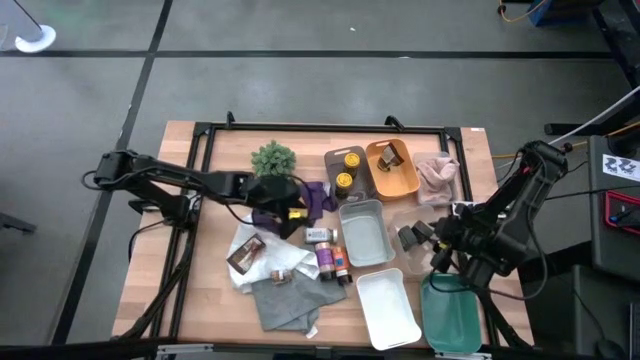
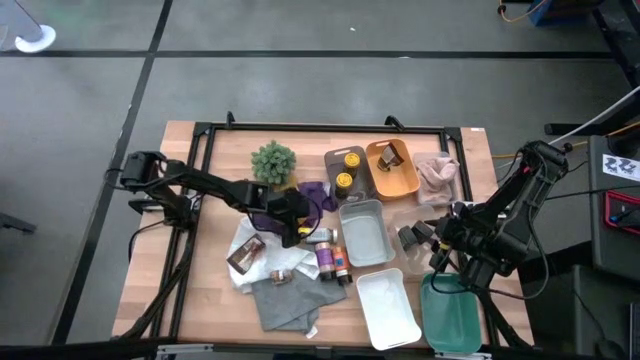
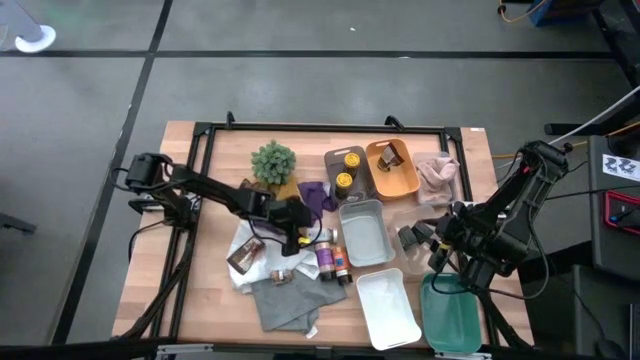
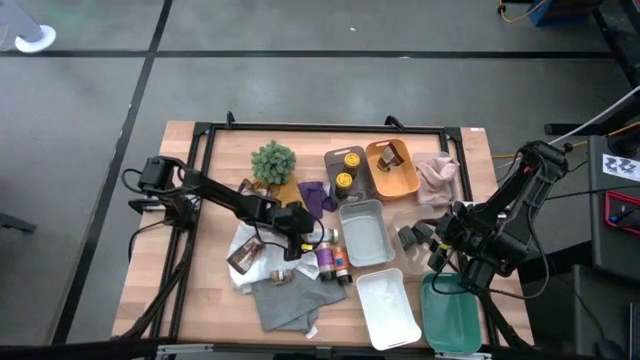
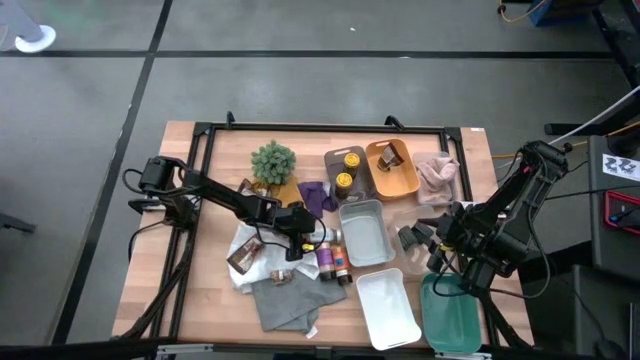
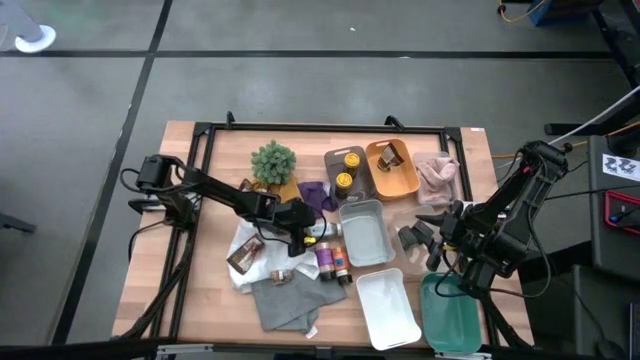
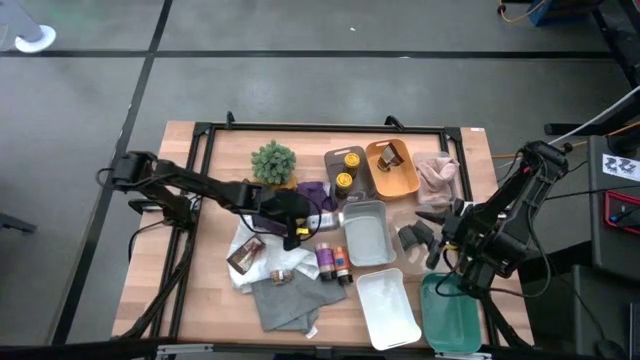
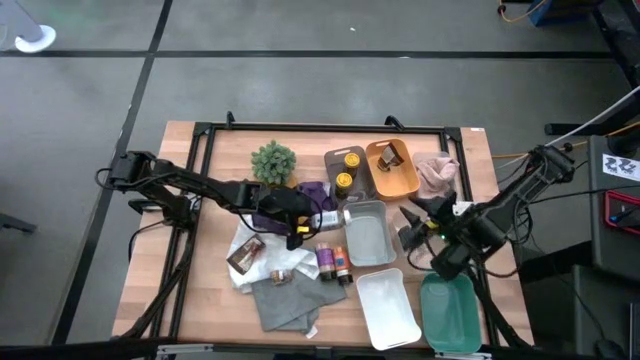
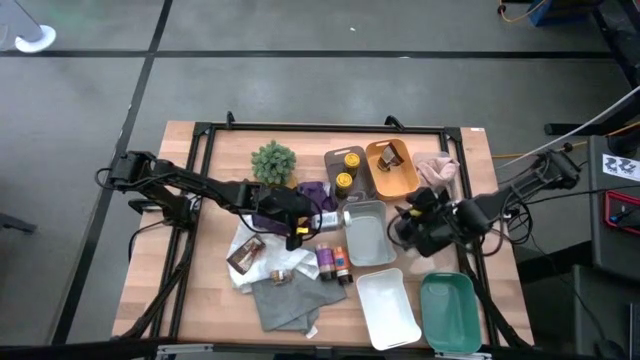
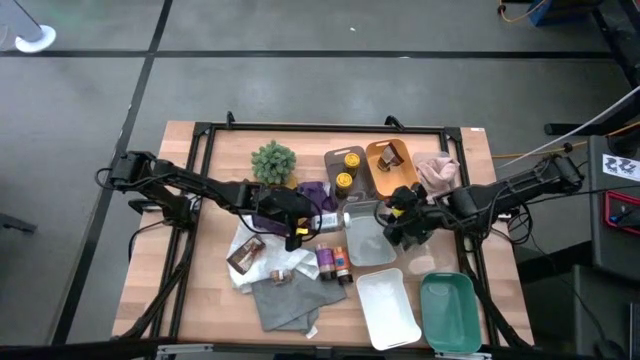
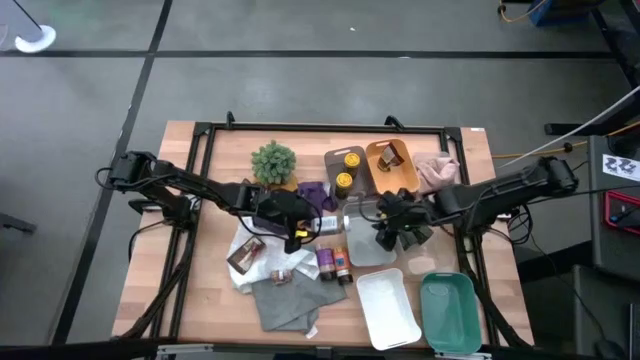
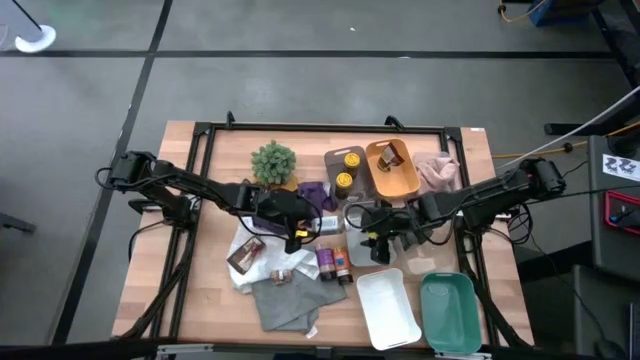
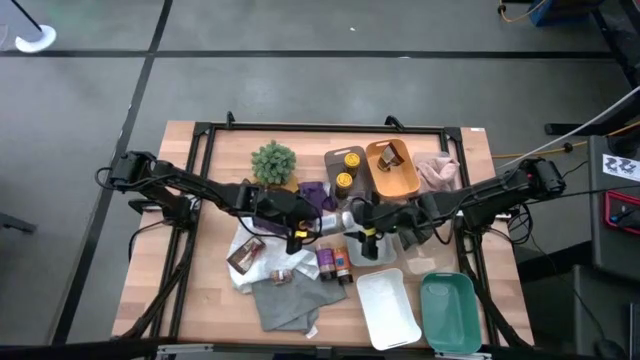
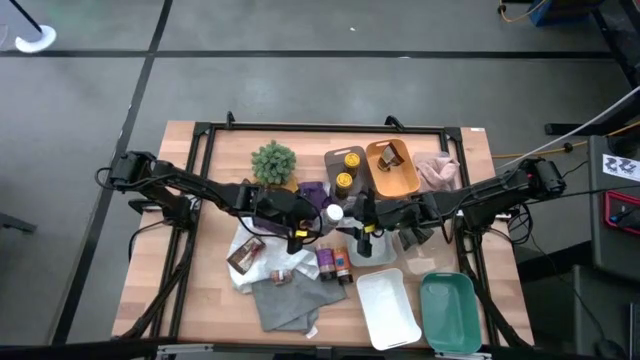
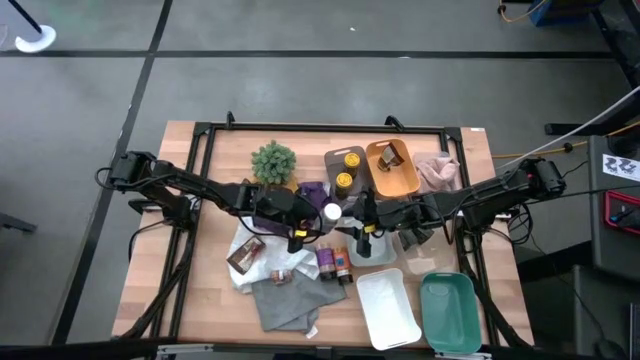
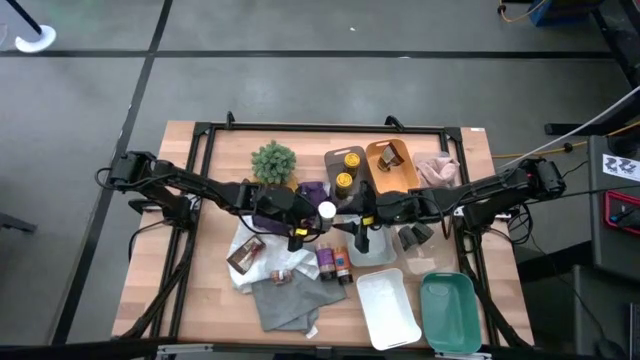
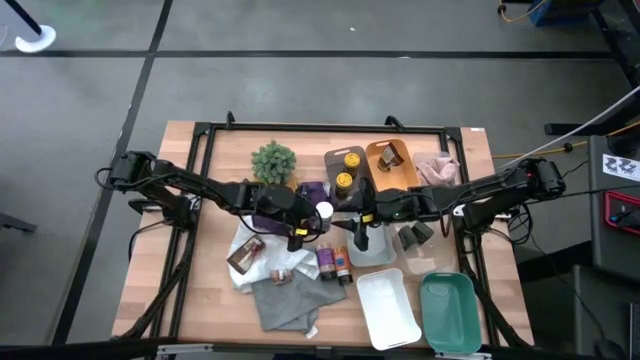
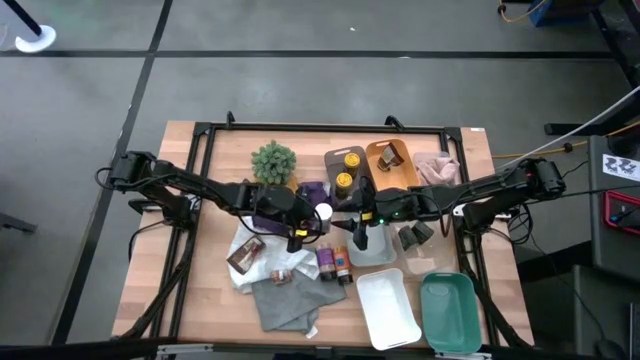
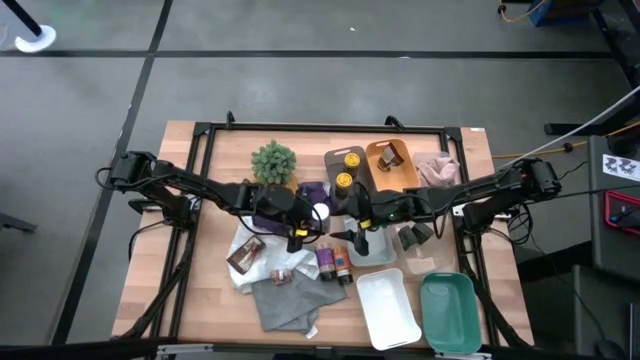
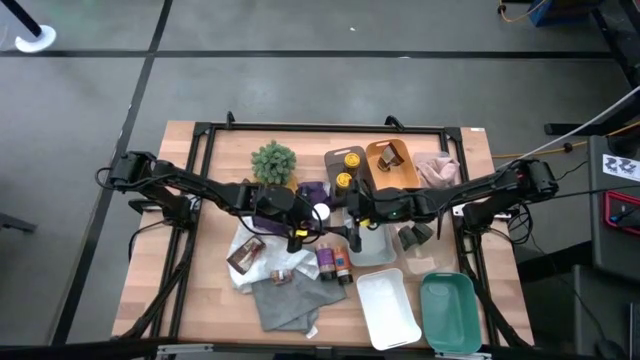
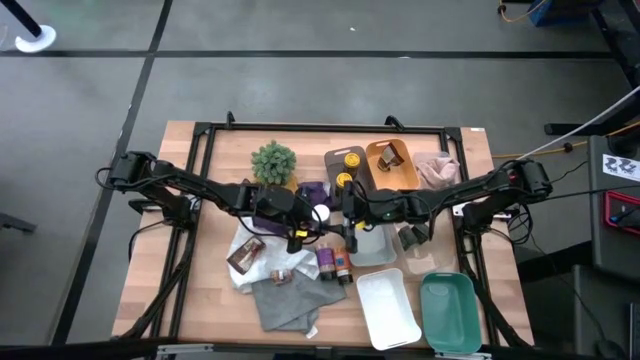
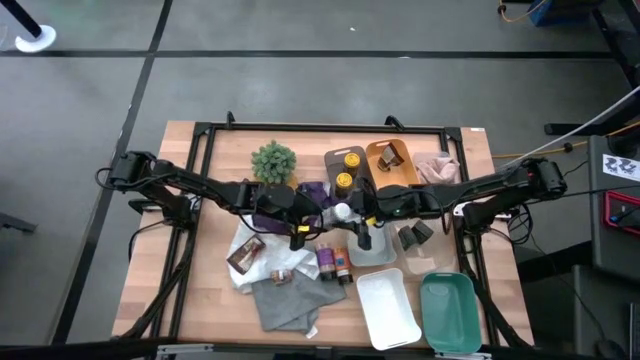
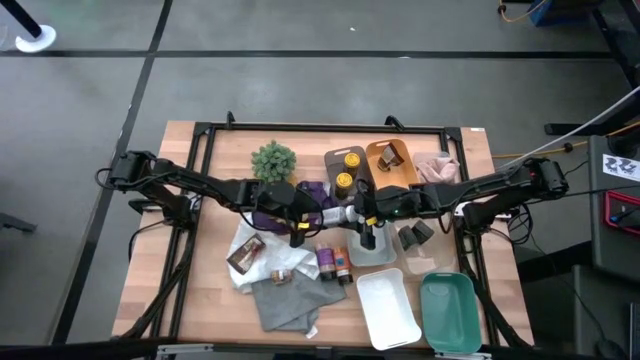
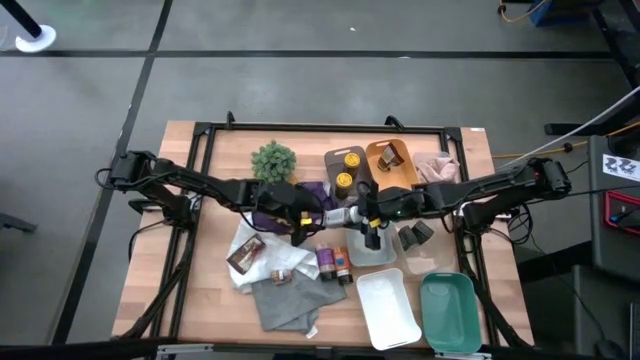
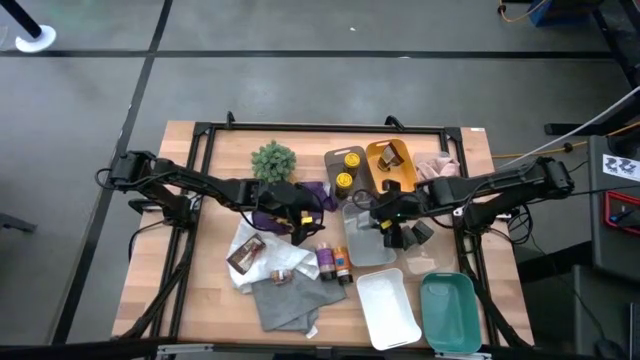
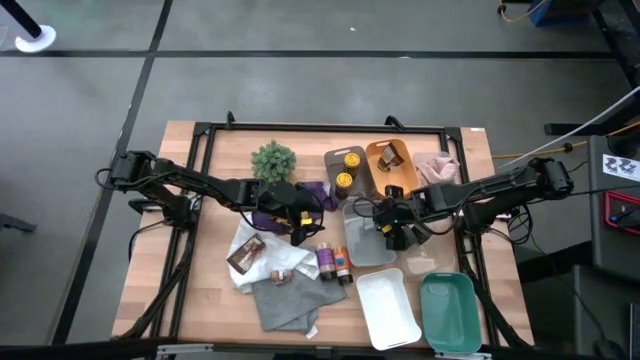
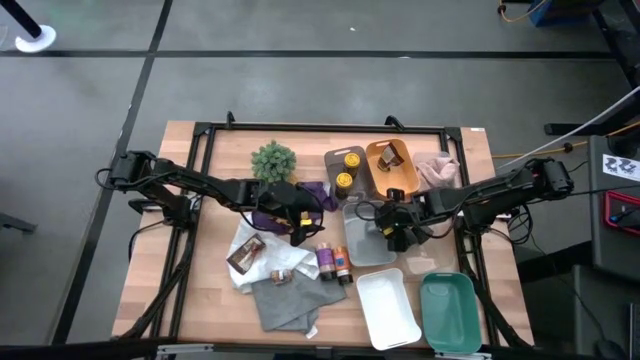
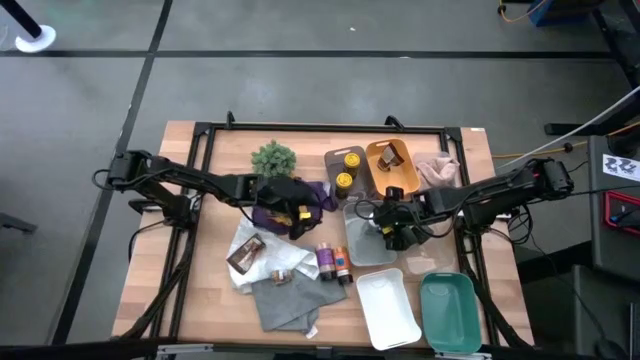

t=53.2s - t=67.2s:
Task: Sort spices by type
Put the white seasoning bottle into the gray bin

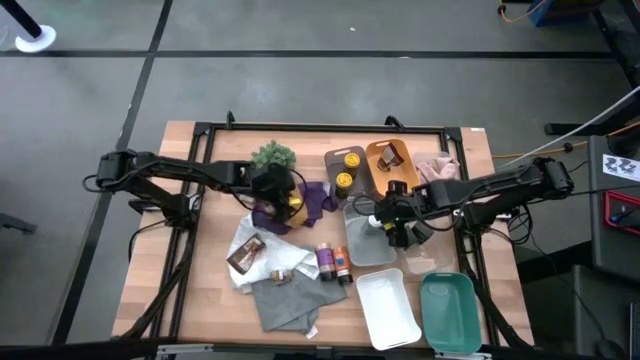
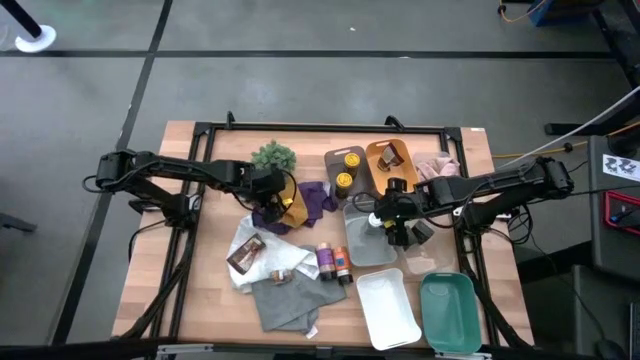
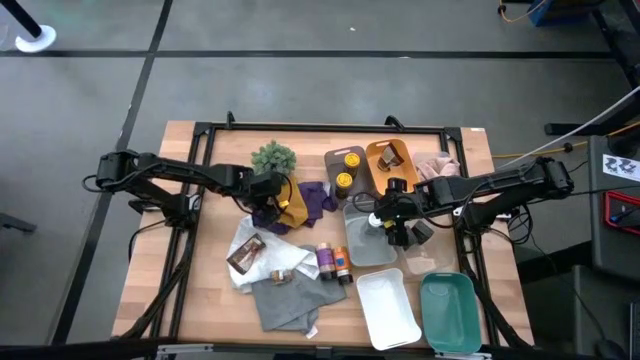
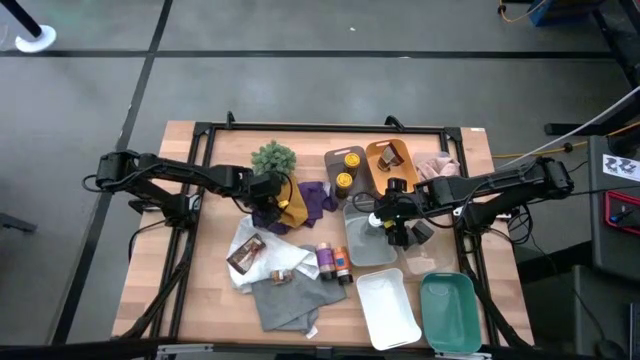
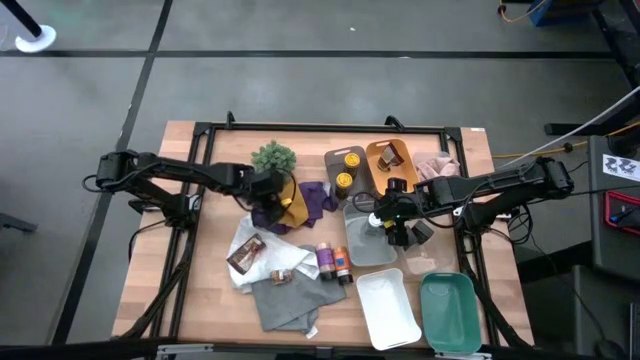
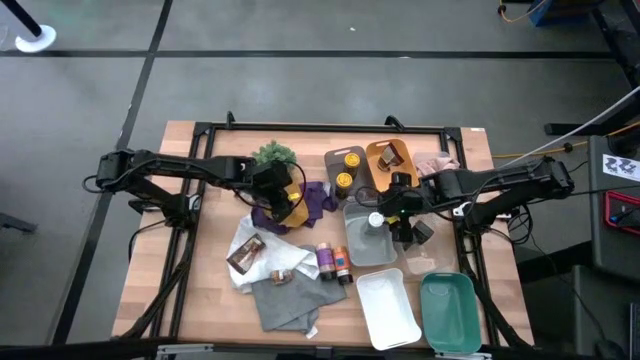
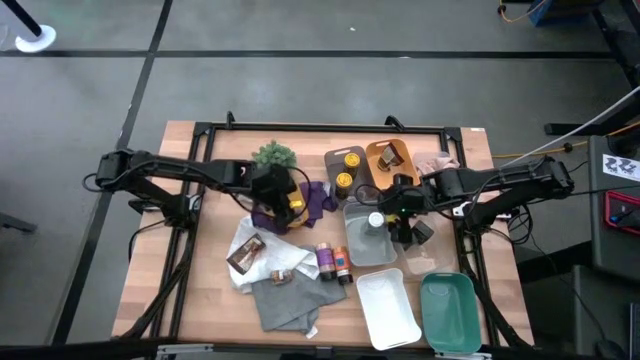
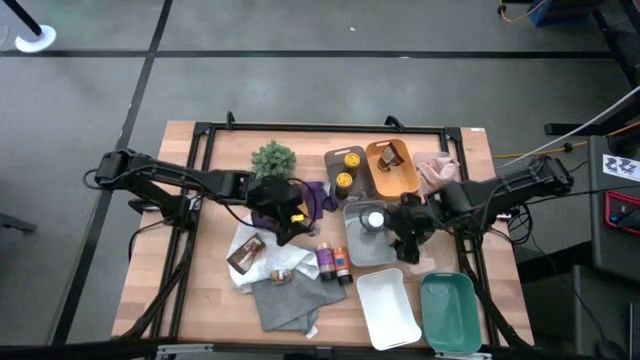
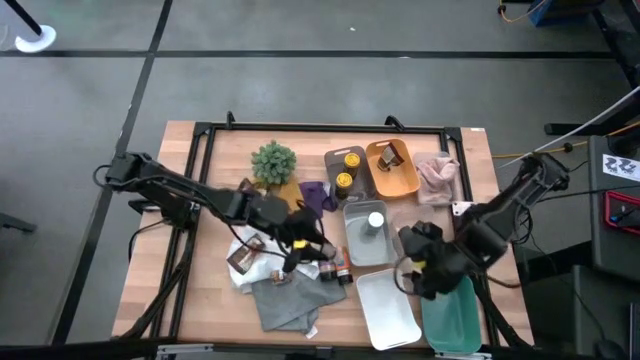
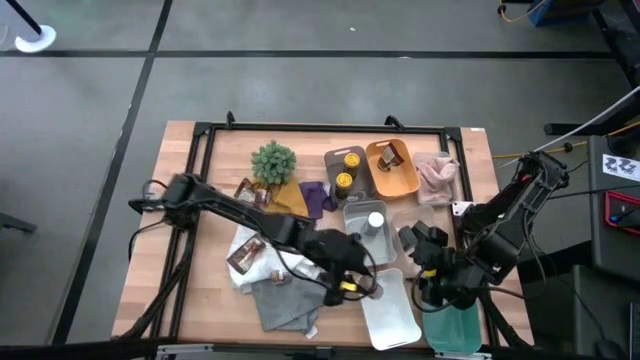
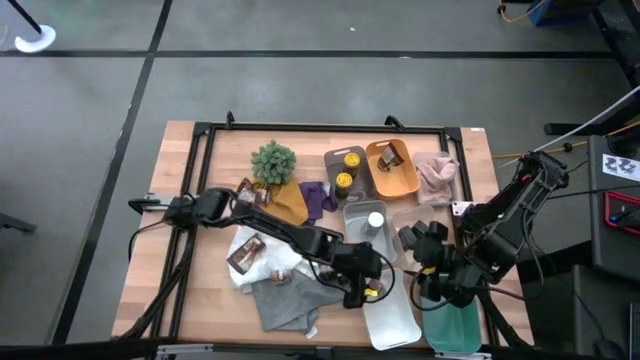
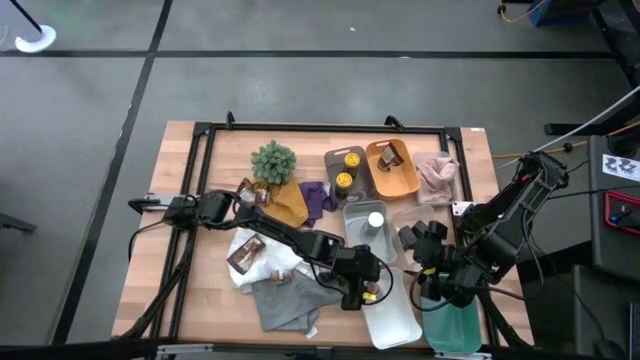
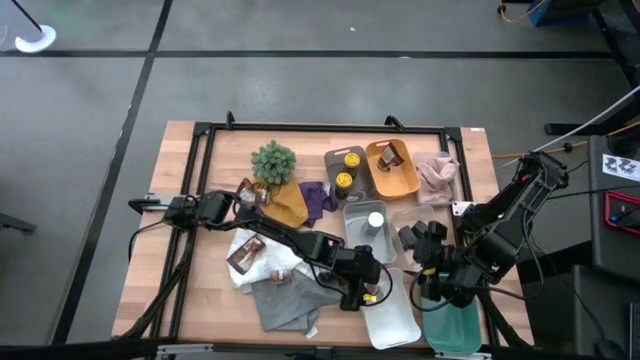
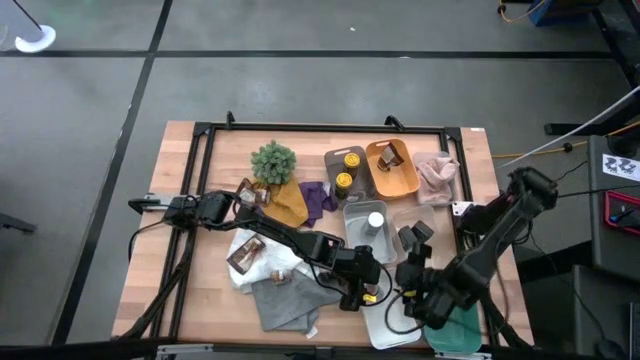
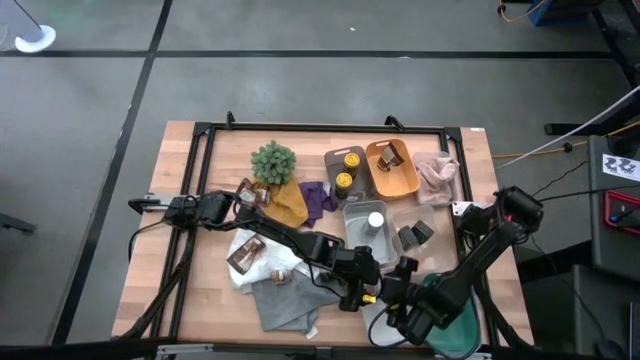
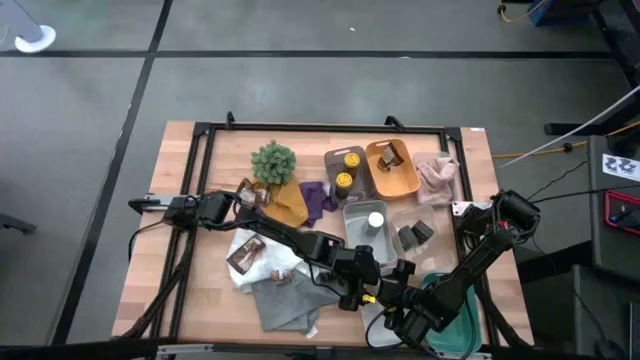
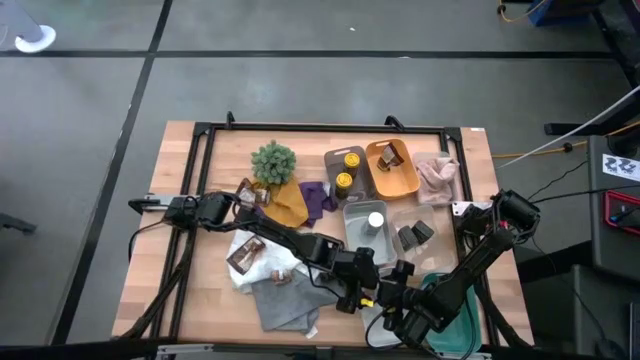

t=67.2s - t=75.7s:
Put the top brown seasoning bottle into the white bin
